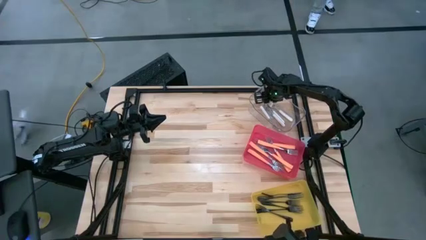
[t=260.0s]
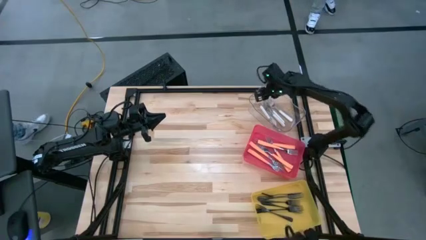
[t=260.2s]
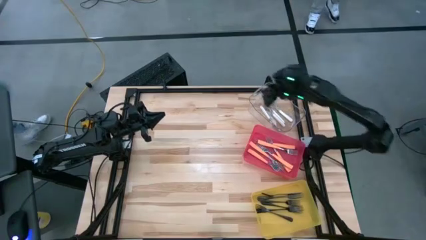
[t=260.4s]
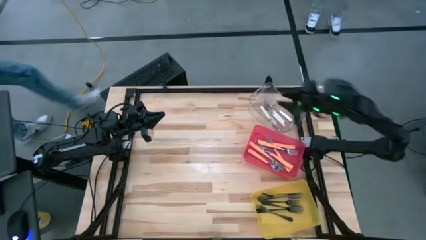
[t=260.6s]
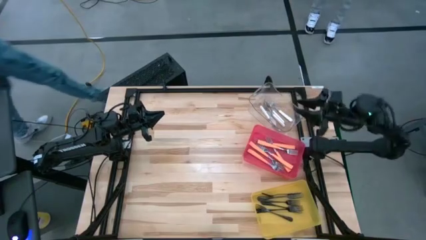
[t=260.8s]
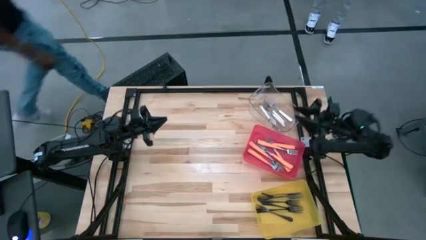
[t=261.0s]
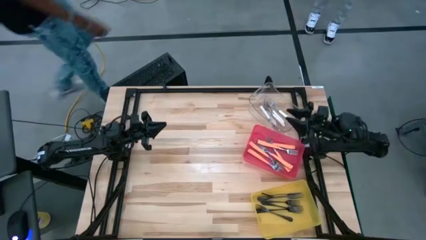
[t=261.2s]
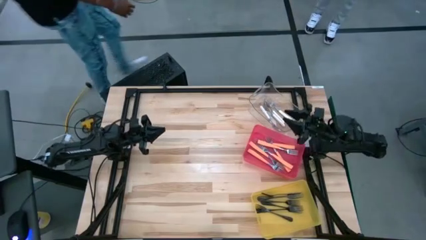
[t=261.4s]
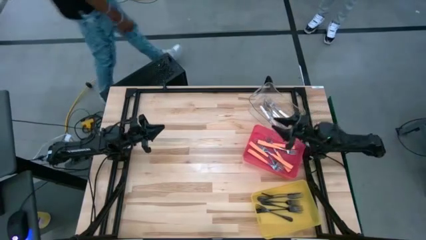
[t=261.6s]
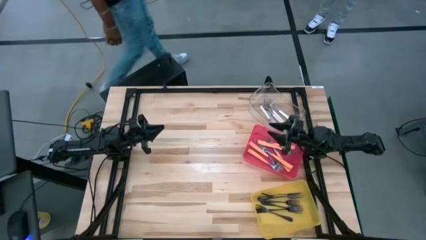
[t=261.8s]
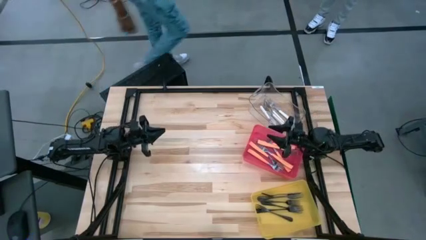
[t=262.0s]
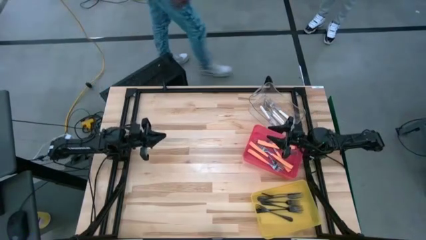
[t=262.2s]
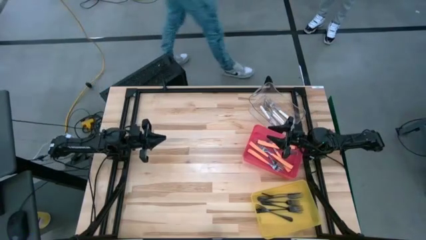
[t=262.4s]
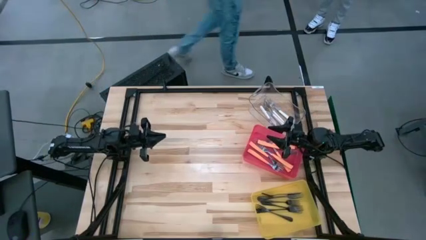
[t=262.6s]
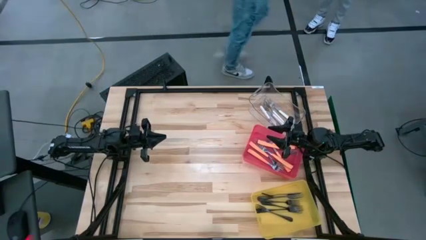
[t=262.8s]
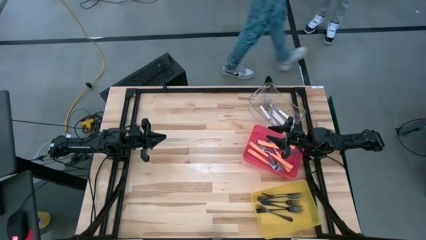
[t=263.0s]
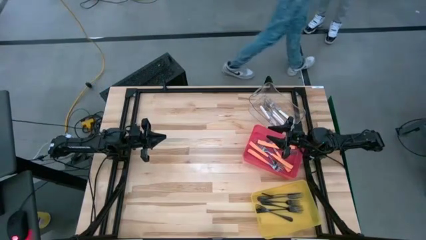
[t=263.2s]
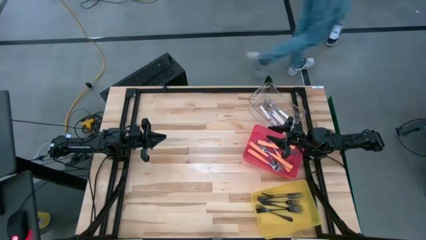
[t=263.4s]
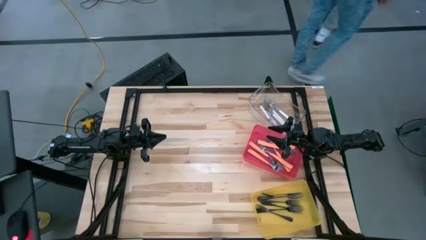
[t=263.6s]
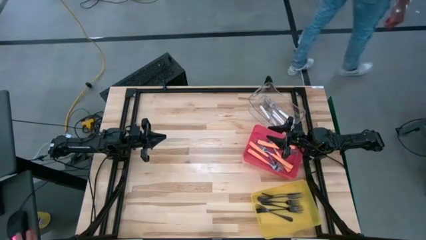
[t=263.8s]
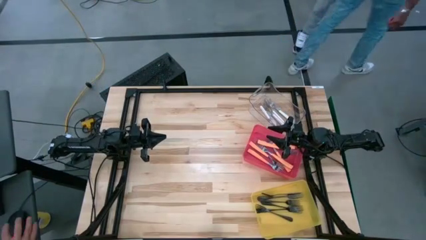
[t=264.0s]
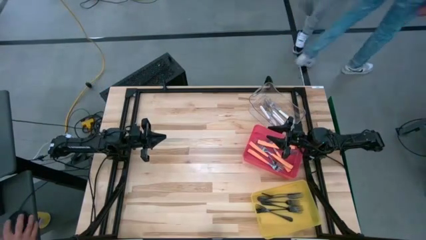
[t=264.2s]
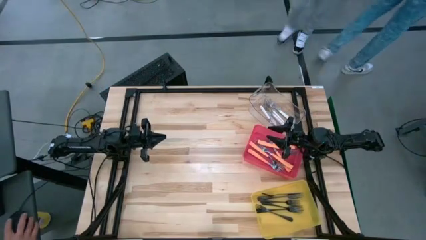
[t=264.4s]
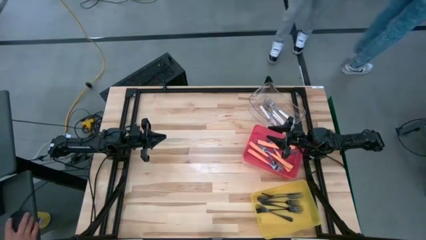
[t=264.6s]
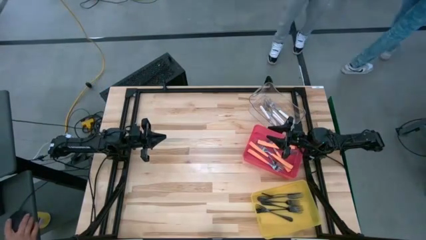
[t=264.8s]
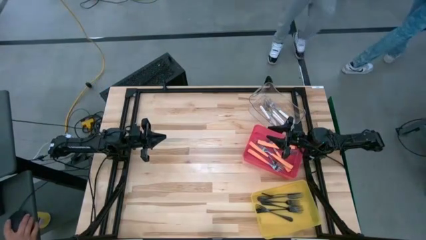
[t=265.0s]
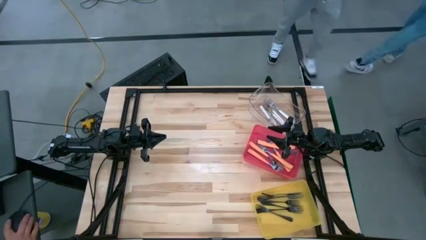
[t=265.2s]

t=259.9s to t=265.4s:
Task: Sort silverware by color (type)
Return to Home Position

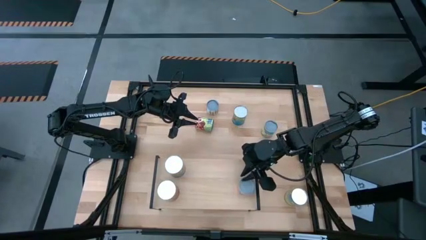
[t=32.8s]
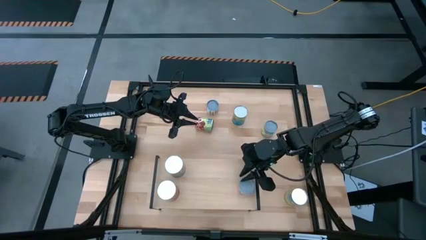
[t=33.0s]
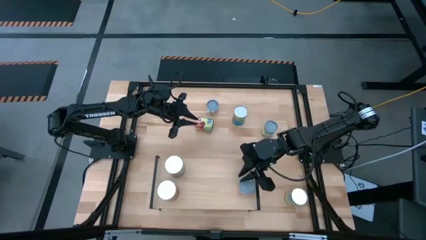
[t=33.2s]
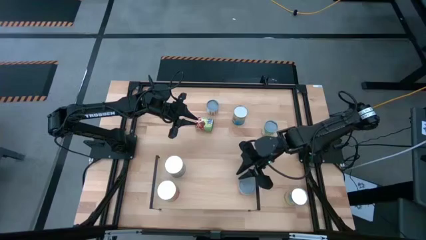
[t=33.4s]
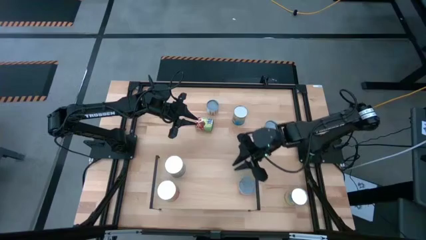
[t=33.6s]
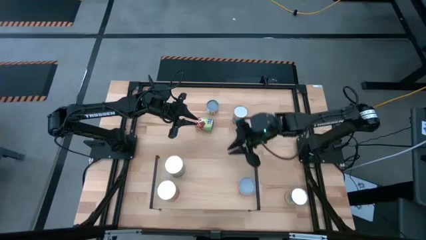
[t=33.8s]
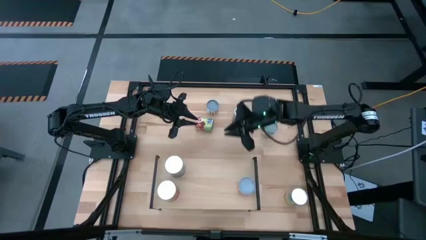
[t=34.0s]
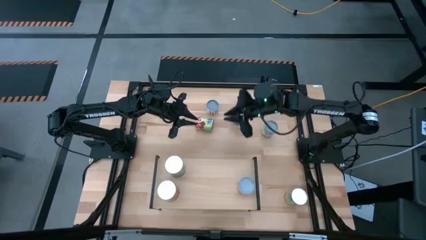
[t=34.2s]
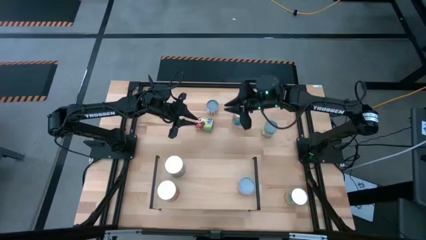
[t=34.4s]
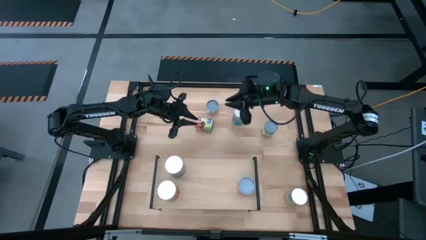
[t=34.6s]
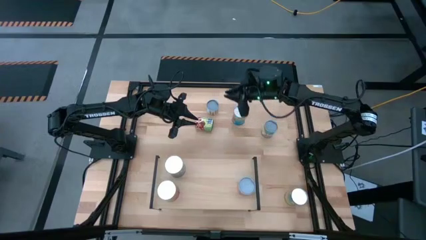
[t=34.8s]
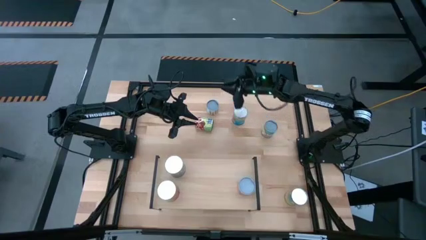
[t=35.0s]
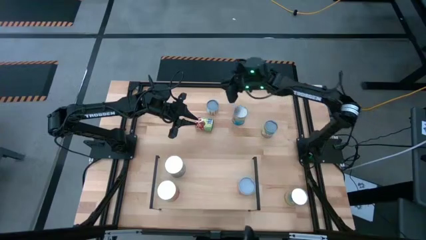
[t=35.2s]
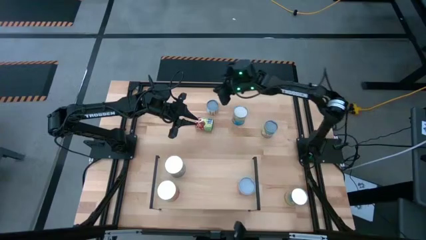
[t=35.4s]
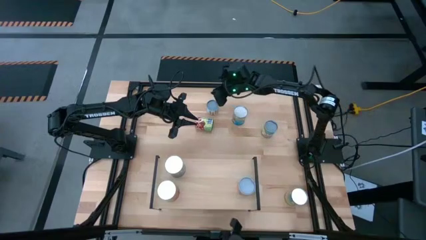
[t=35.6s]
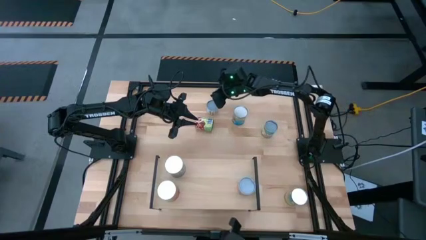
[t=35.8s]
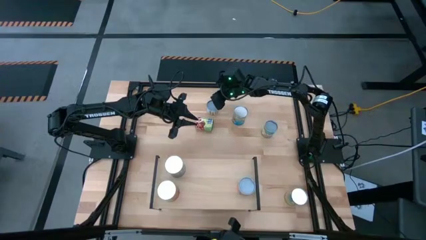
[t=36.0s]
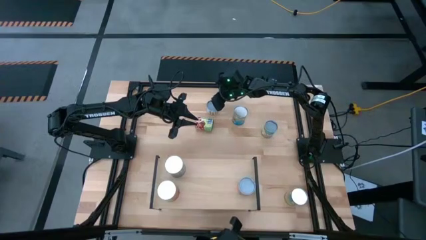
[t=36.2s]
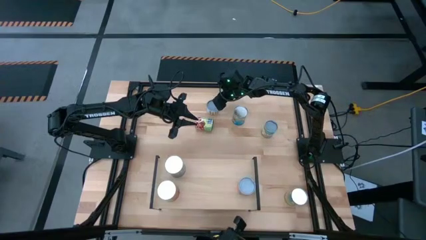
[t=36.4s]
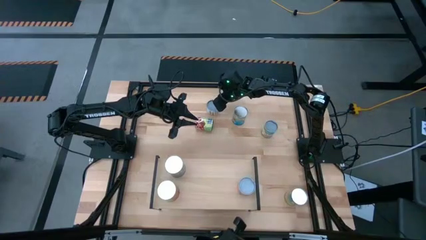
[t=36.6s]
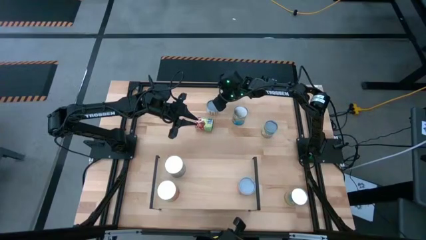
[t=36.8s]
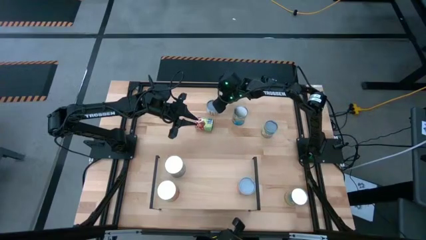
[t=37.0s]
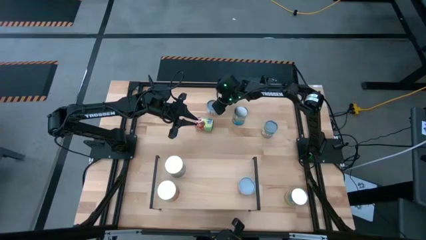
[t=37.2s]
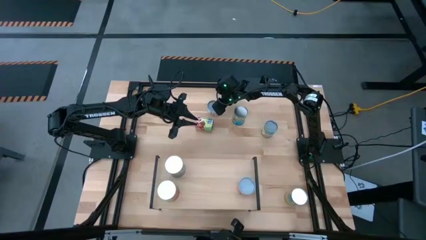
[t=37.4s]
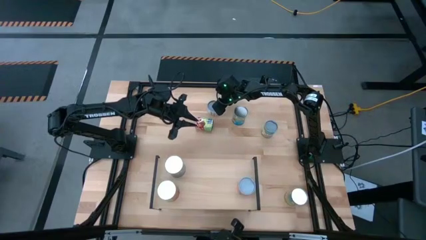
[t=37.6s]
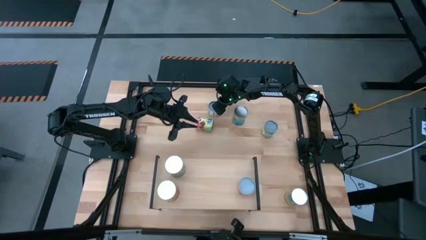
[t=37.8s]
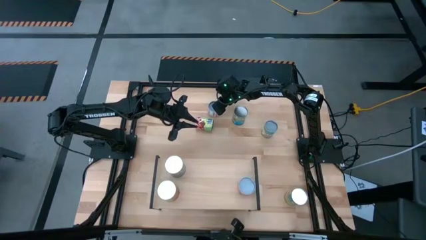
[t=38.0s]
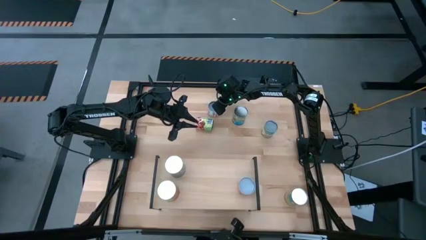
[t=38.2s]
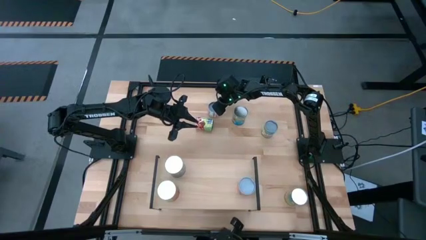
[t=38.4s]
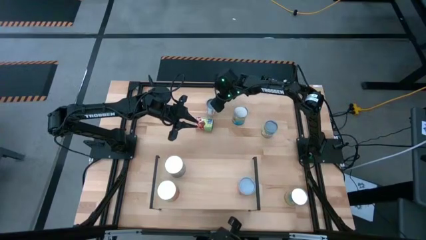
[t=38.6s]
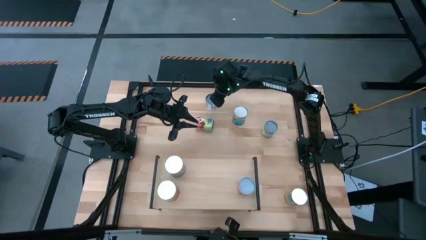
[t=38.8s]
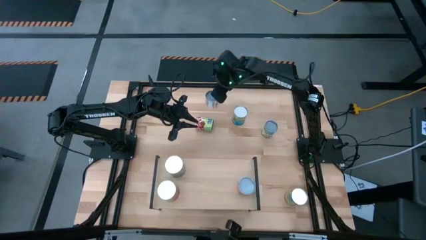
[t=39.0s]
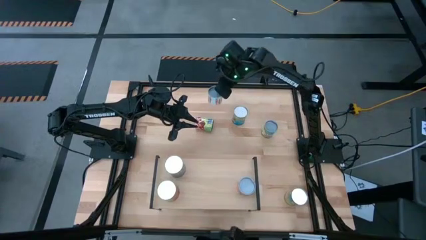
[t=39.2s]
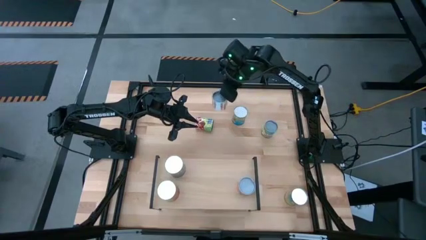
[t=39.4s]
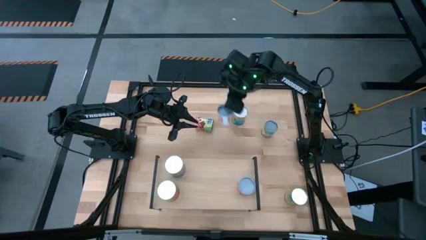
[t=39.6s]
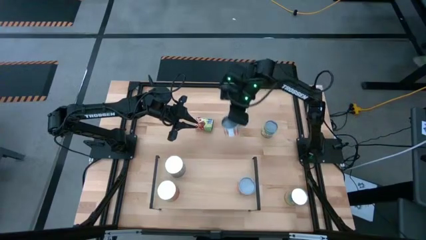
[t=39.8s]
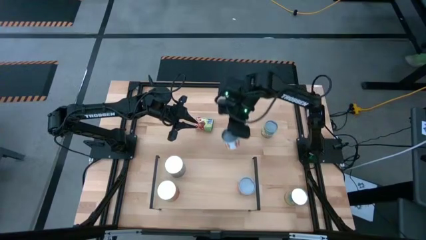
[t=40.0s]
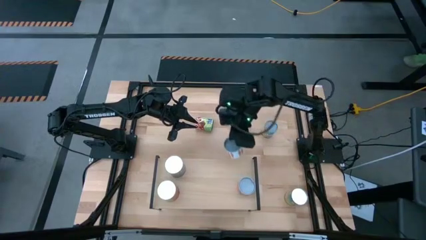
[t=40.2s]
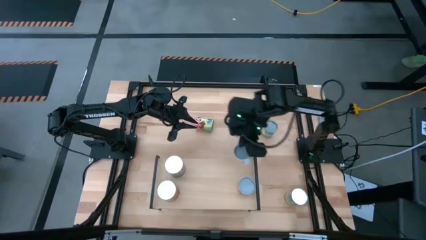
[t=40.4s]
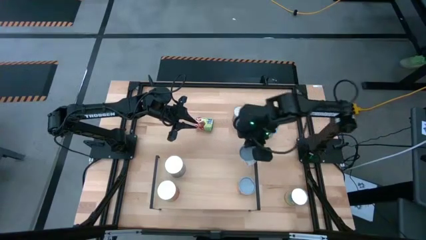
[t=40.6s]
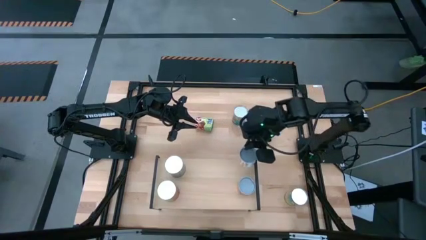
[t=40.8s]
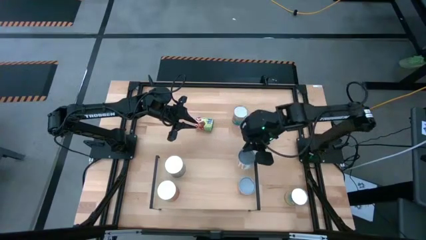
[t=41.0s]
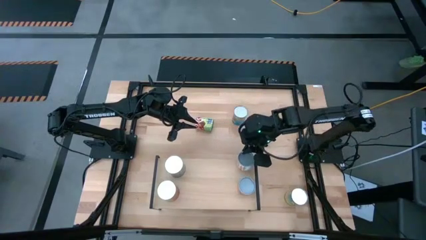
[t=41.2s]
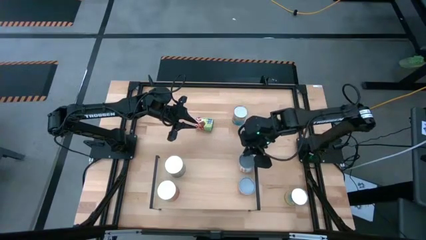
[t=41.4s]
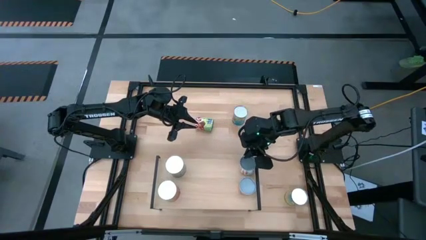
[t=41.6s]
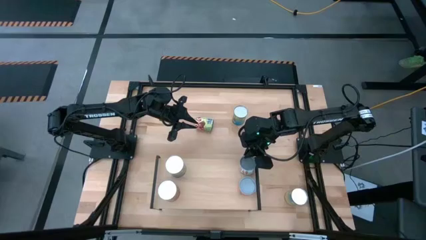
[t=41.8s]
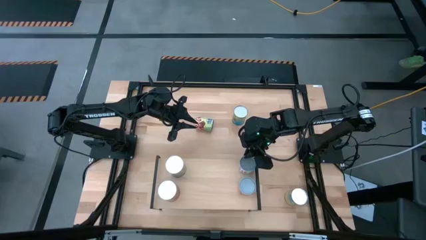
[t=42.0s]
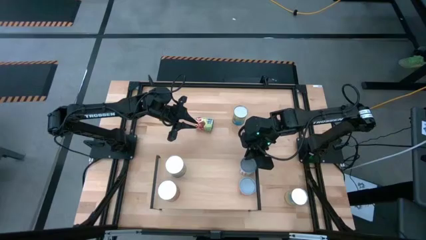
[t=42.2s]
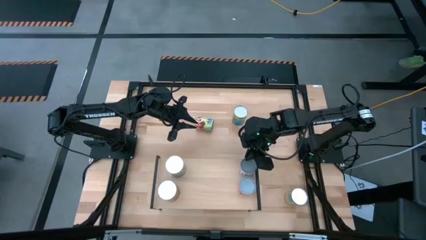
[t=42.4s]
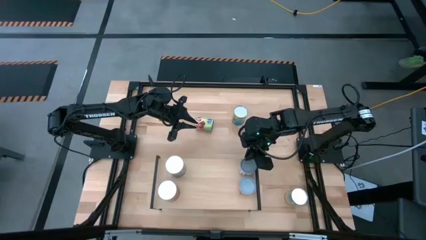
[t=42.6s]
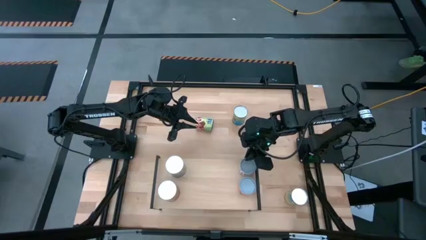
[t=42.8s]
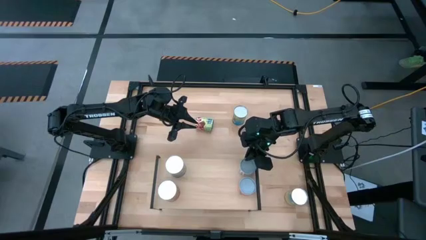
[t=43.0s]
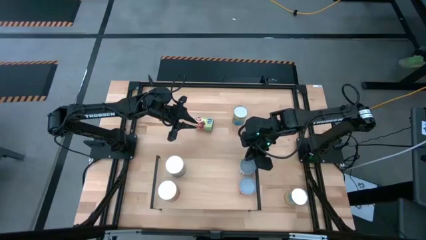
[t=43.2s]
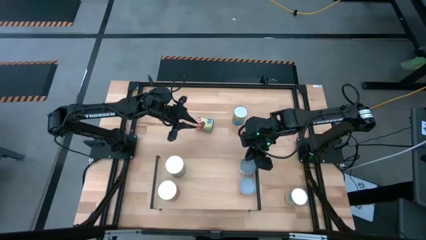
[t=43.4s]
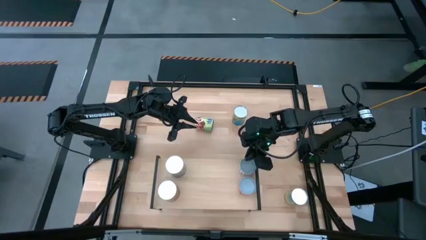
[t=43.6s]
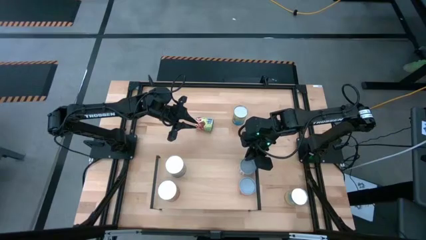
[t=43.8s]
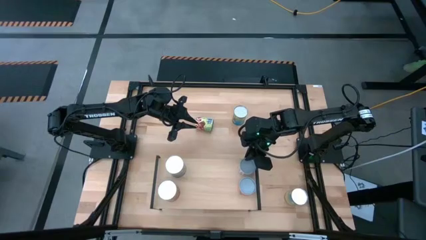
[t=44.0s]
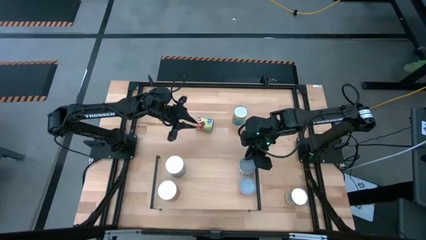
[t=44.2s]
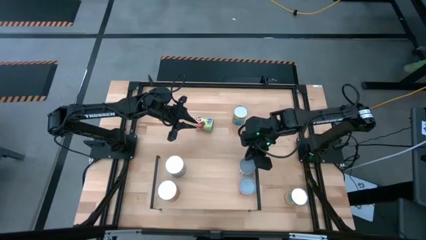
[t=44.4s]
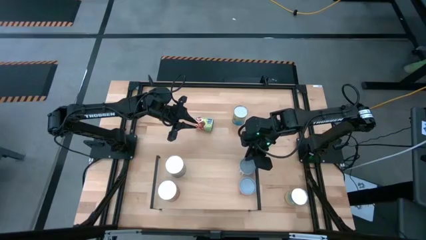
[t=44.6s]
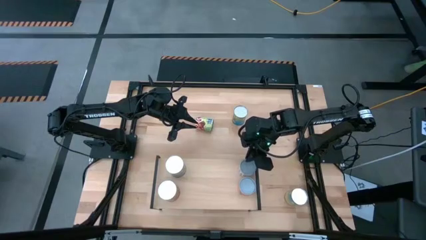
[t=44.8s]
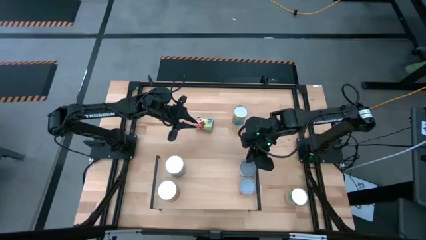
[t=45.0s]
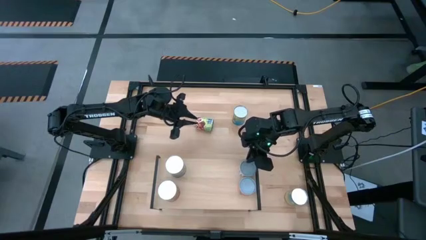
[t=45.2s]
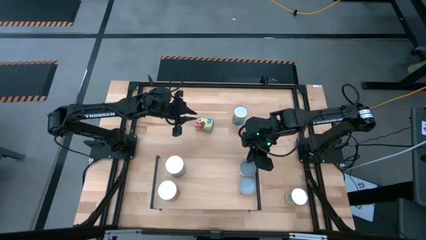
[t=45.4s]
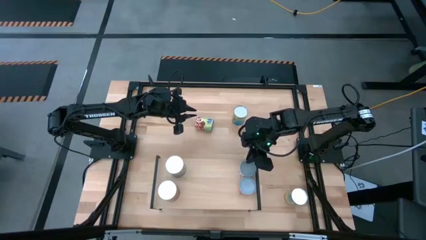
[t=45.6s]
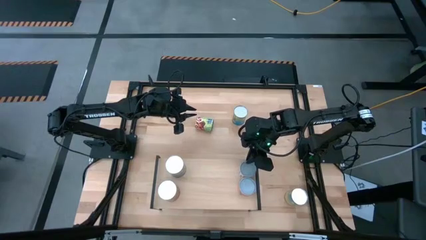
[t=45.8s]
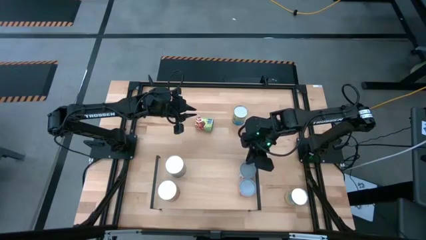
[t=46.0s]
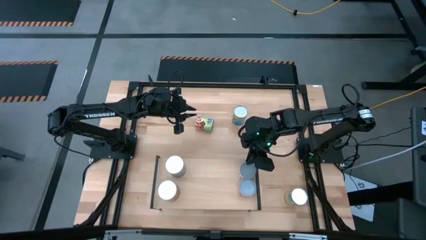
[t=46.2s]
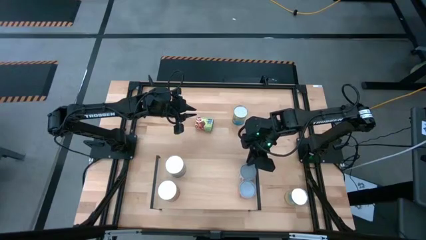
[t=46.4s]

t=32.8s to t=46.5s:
Task: Pick and place cans onto a shelf
Put the canned sliced carrots on the shelf
